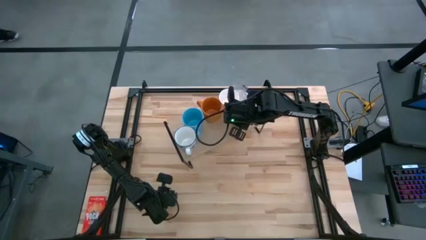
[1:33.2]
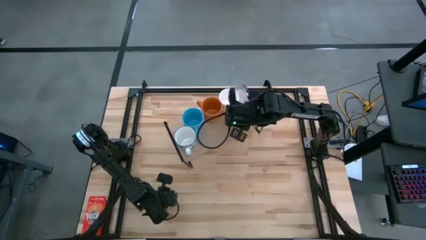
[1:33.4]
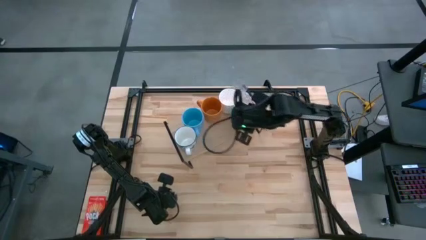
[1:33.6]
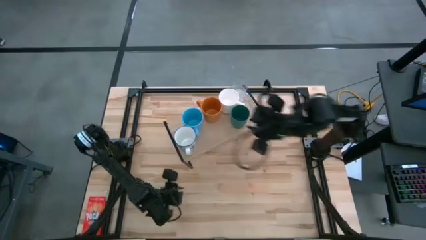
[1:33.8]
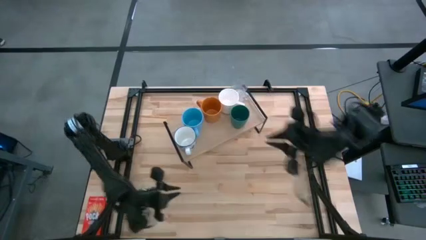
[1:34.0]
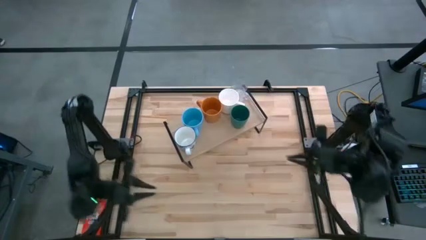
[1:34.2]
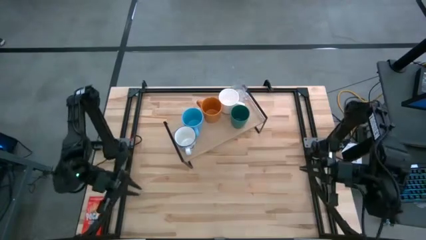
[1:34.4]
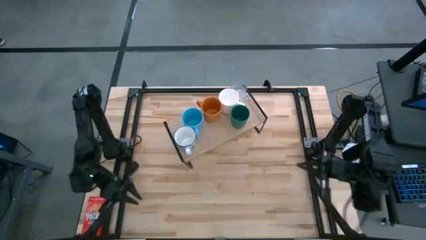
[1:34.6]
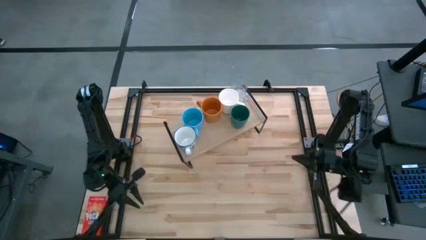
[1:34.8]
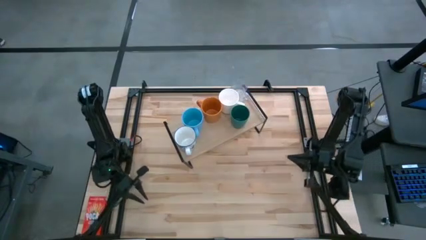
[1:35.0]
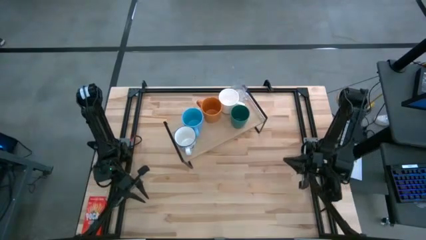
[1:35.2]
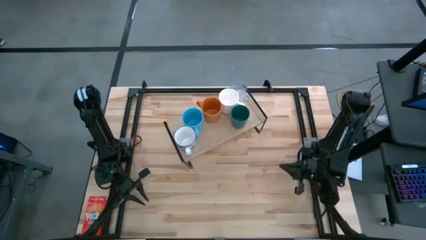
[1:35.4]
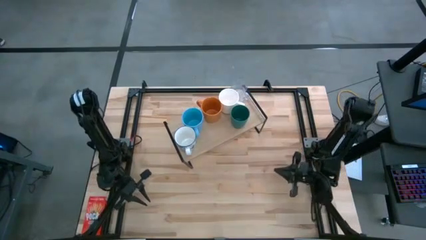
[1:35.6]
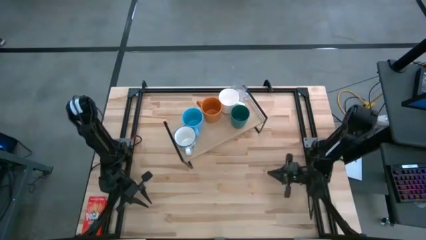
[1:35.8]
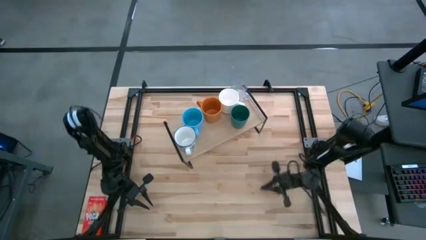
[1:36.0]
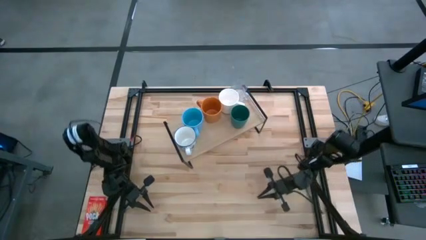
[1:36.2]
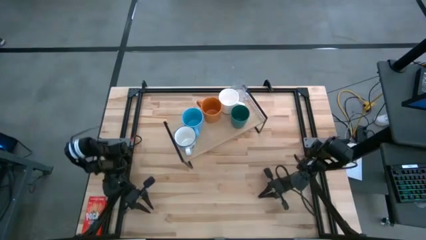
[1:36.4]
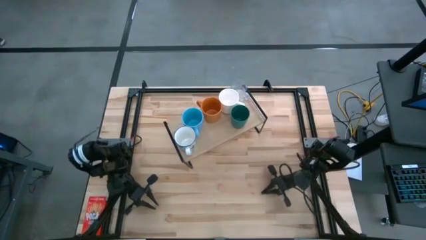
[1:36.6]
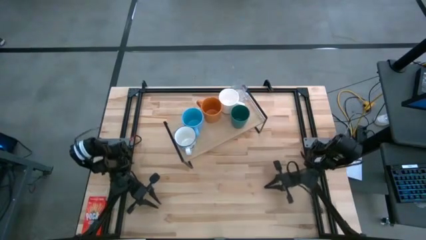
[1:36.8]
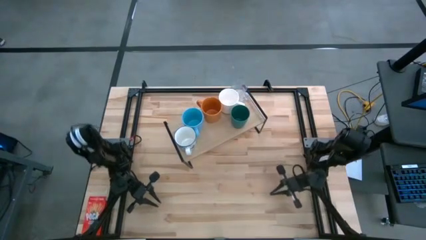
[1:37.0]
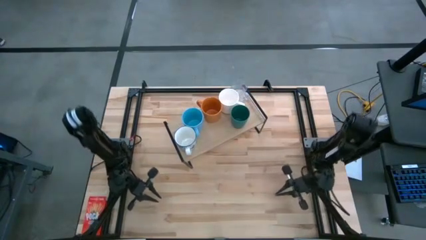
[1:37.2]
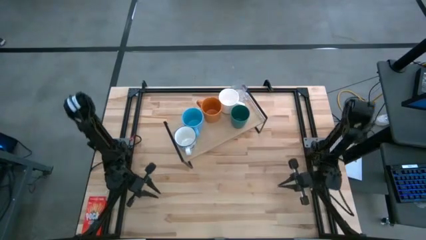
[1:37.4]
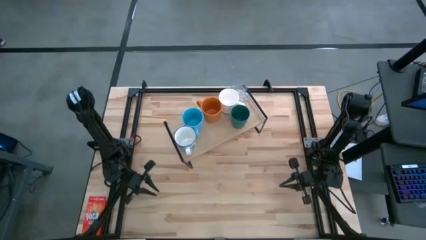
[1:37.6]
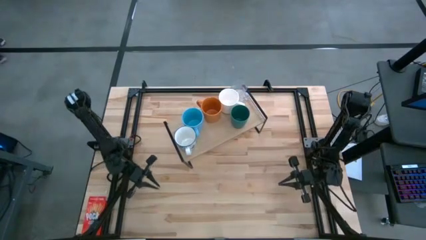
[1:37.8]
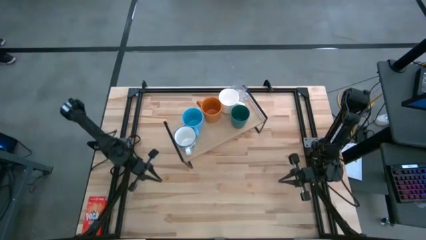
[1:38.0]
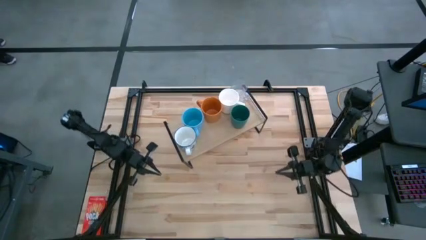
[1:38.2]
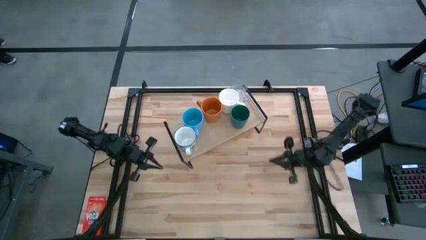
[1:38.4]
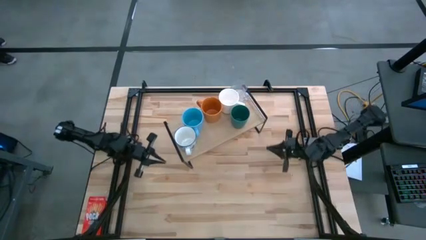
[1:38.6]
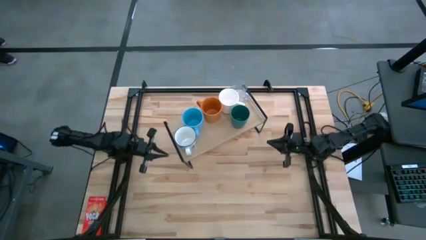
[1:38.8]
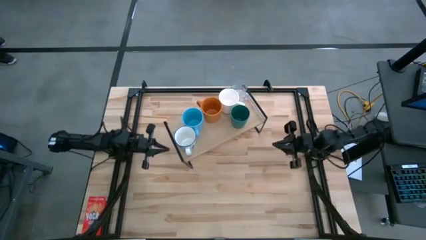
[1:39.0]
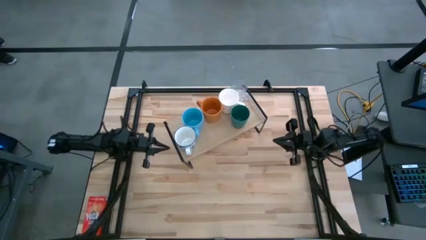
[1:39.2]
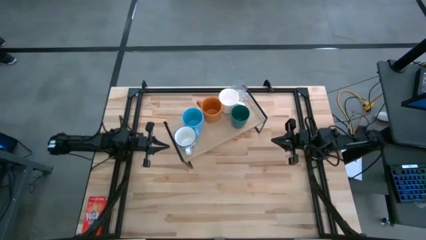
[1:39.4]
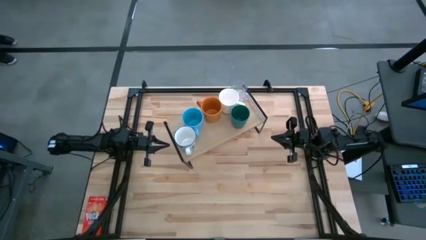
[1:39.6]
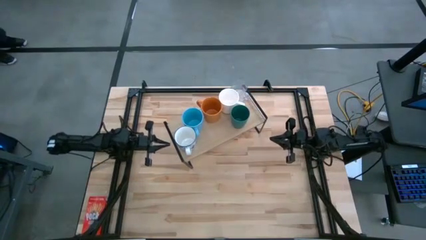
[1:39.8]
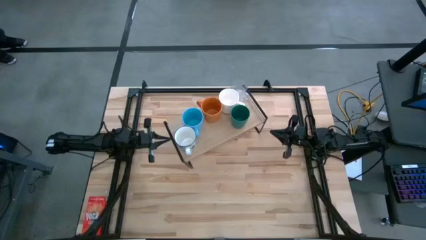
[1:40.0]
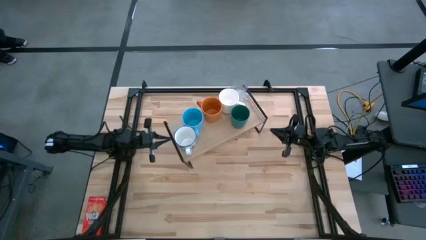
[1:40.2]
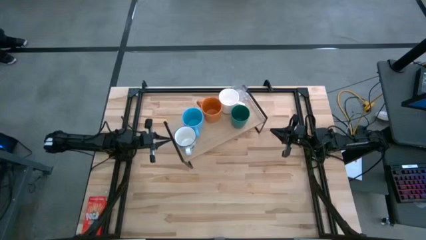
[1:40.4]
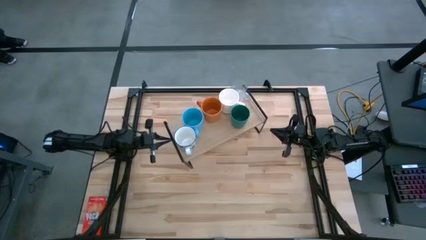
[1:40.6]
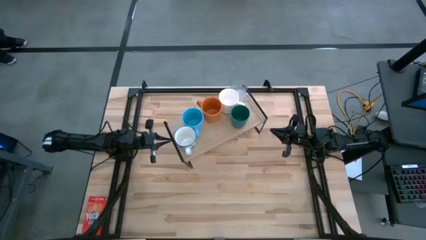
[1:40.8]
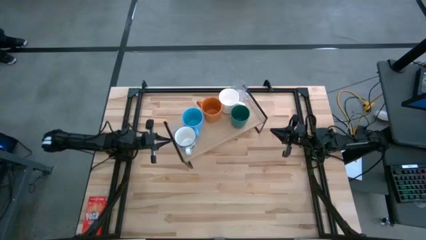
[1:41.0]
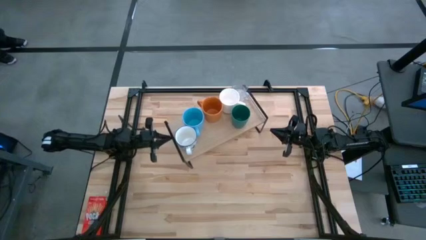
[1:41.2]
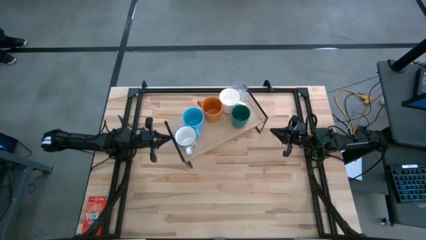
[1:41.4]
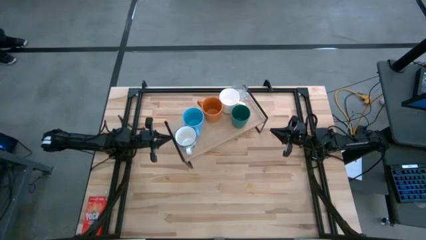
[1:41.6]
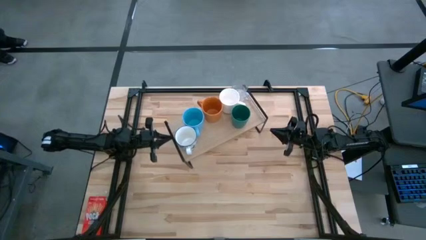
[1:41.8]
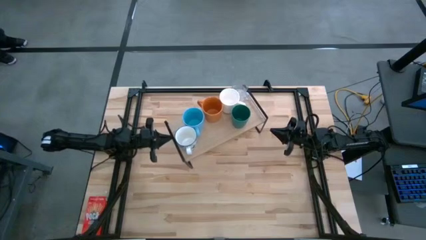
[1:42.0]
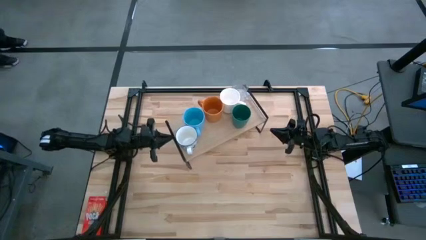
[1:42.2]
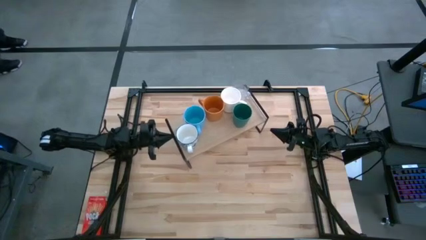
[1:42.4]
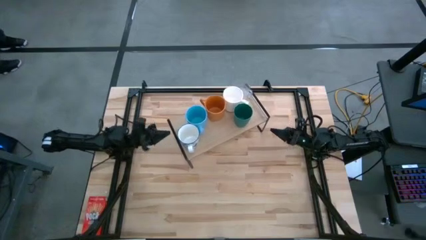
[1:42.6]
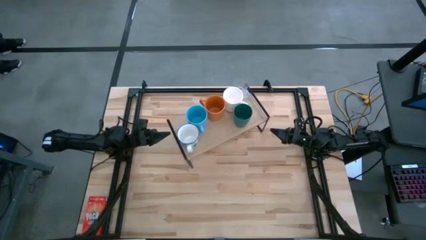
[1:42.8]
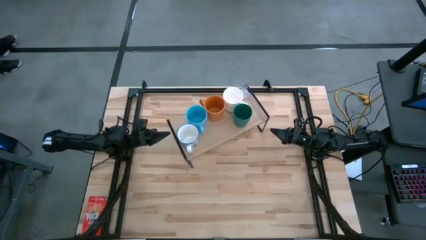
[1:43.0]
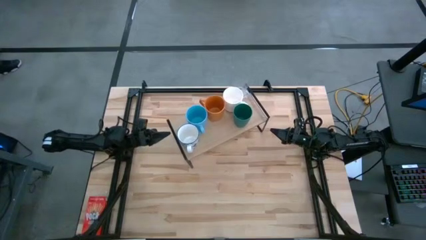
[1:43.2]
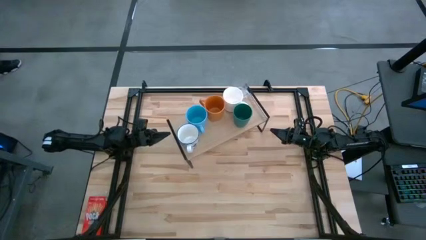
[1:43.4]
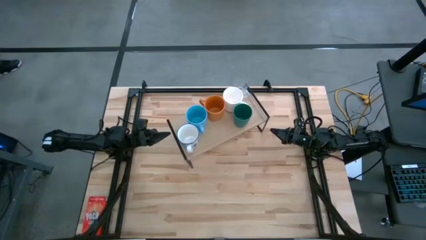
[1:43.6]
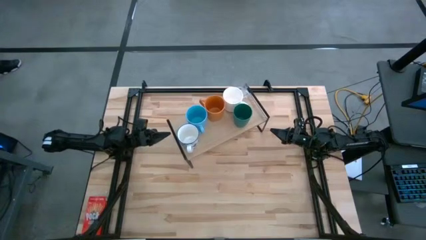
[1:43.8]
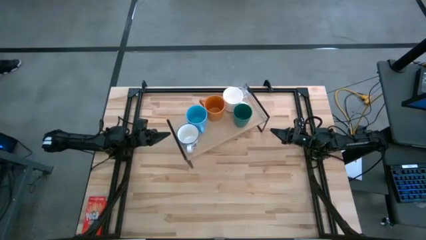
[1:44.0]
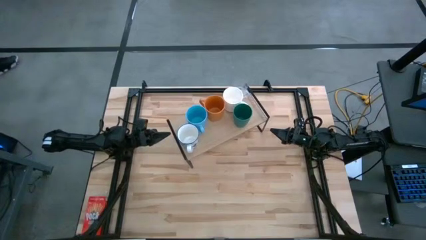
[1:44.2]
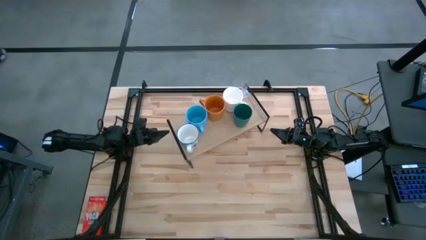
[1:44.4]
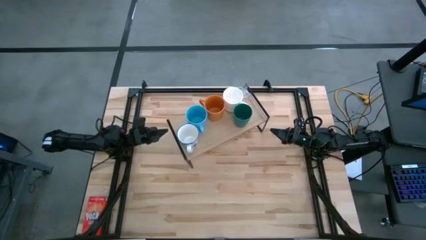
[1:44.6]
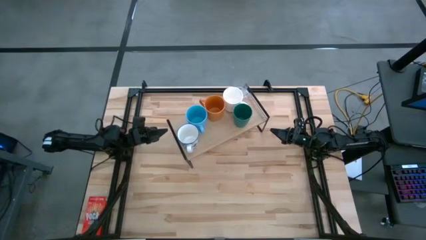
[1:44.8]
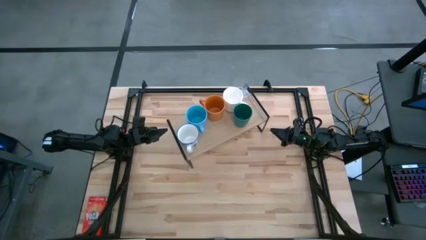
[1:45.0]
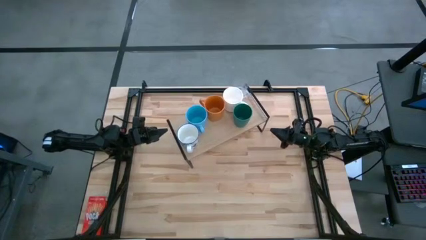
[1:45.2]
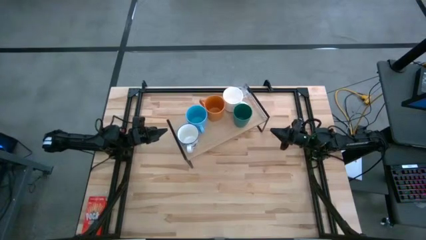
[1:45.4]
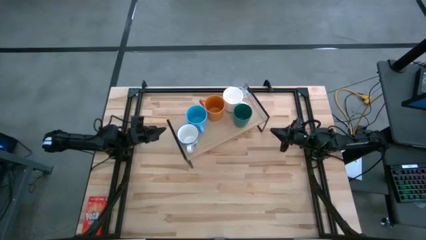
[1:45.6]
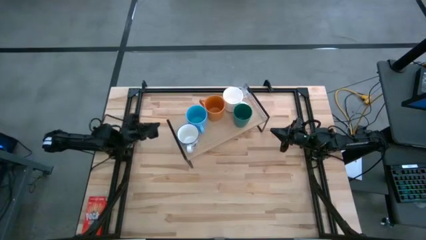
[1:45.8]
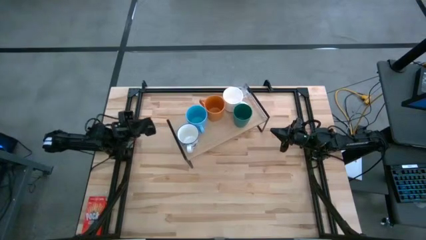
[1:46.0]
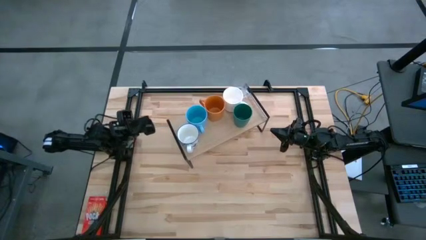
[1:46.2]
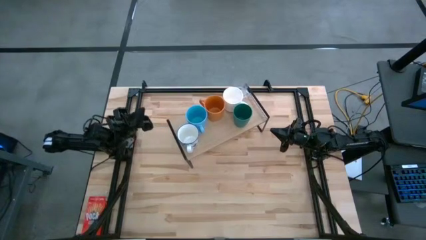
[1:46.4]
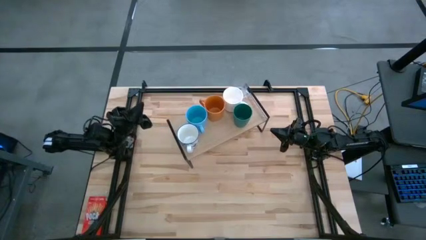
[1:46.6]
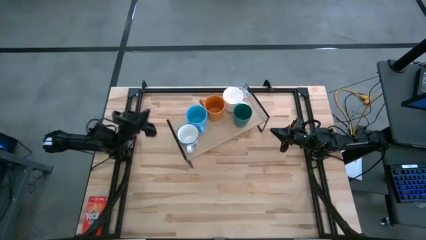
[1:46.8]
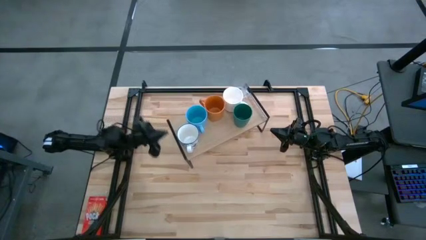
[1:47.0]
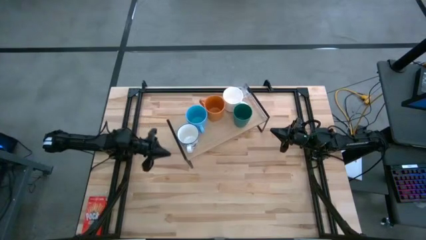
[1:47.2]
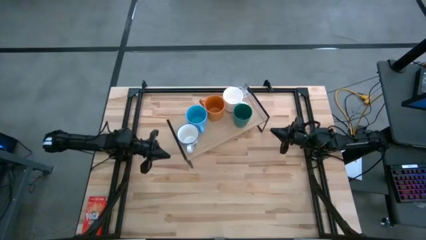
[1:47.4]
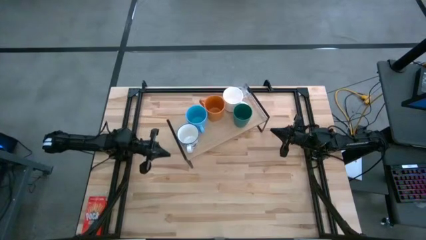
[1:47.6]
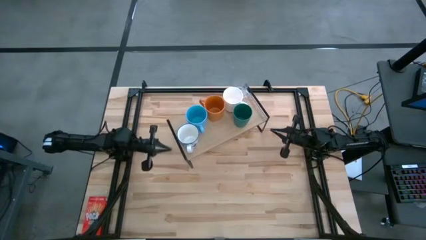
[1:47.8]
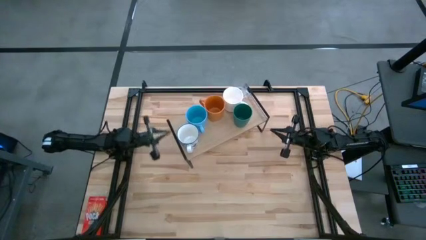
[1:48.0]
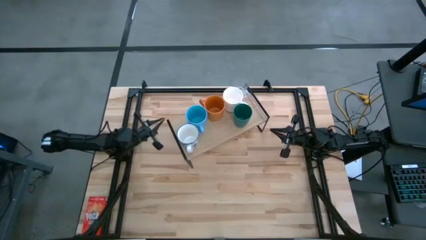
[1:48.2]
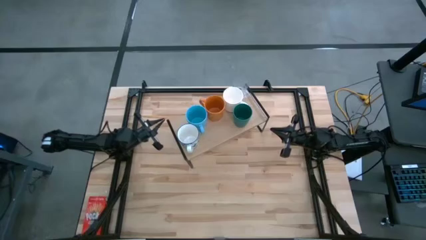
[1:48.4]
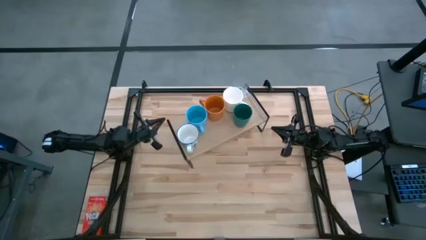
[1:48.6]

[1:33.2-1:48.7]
Task: Stack small to large cups/mugs on shelf
Return to Home Position

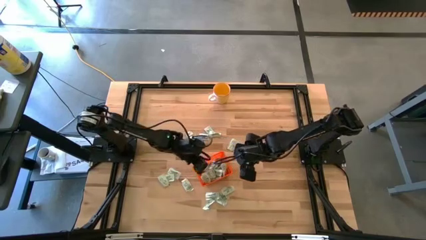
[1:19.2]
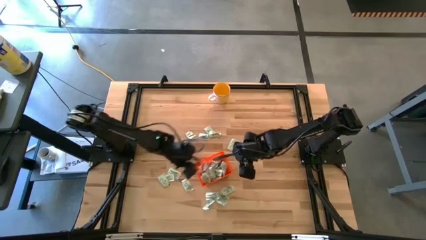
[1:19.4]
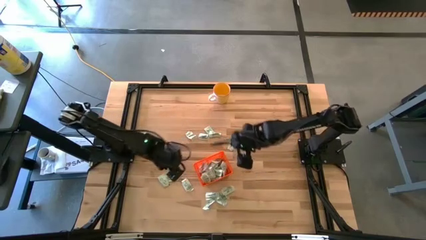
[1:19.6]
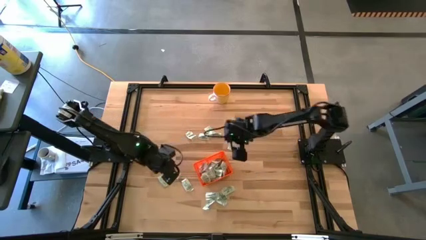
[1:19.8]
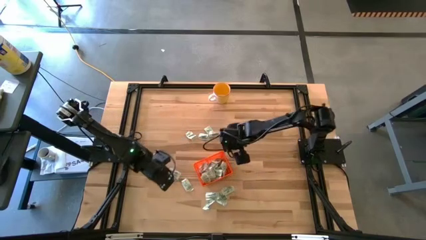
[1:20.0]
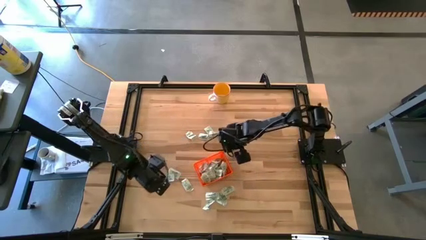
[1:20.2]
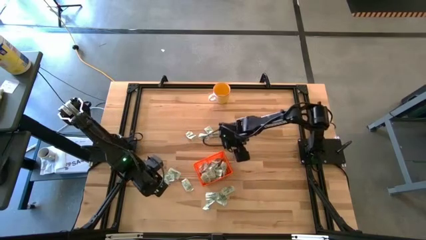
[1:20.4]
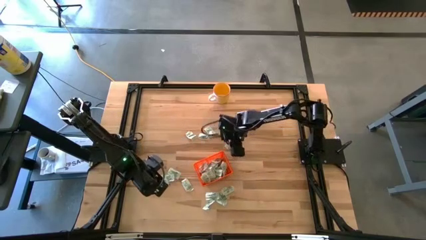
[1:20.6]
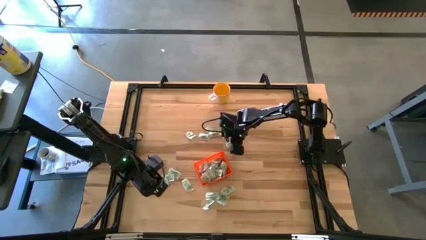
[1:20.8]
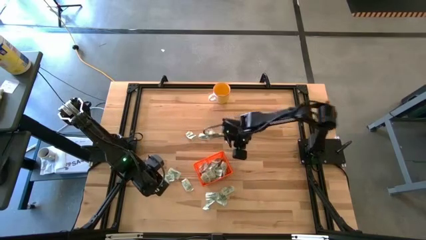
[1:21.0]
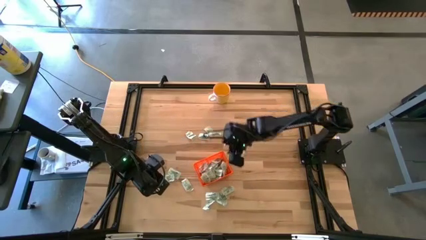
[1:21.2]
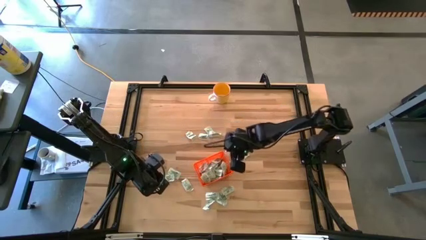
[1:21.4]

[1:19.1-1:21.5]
Task: Pick and place Stevia / Truvia into bins
Put the stevia packet into the bin
